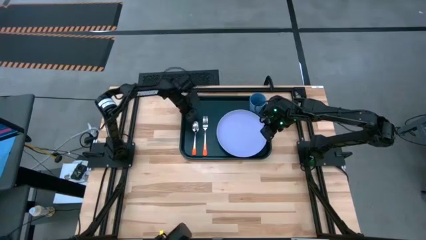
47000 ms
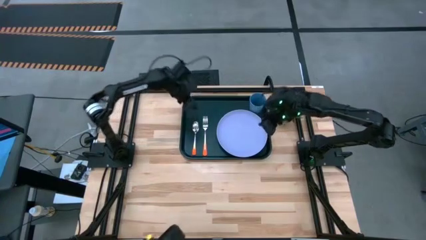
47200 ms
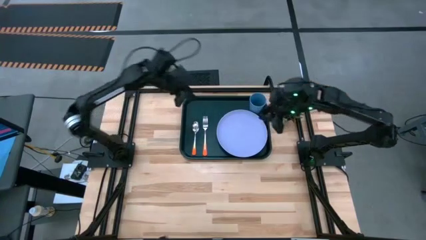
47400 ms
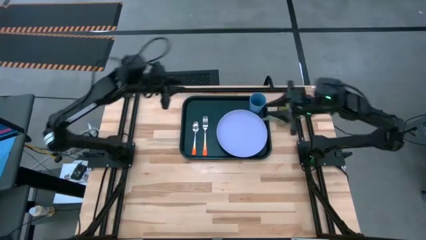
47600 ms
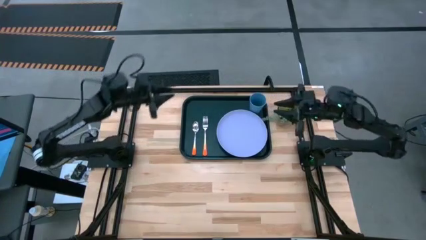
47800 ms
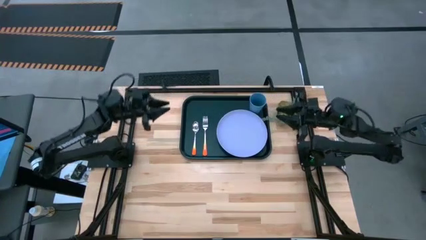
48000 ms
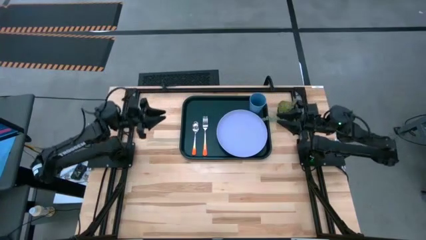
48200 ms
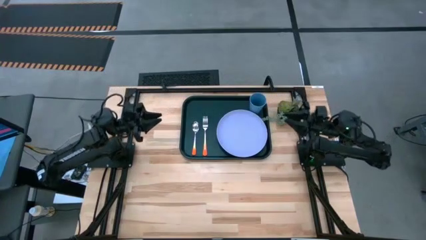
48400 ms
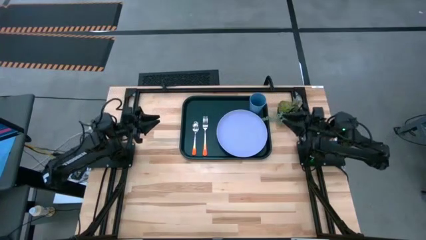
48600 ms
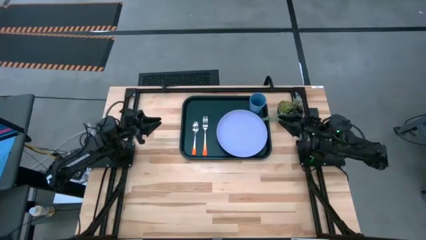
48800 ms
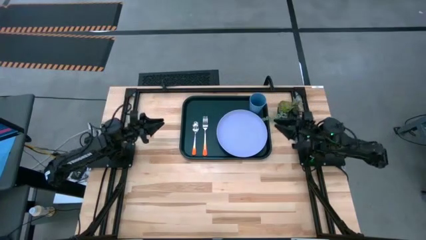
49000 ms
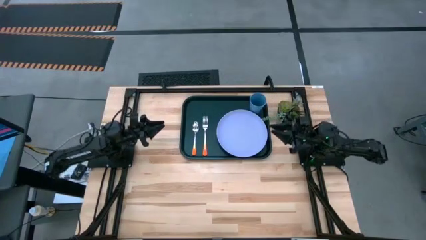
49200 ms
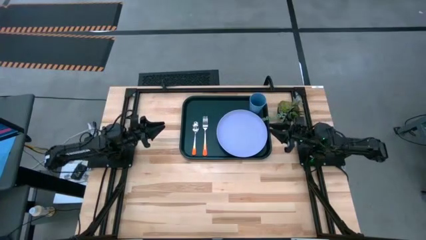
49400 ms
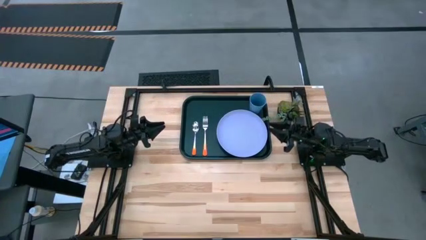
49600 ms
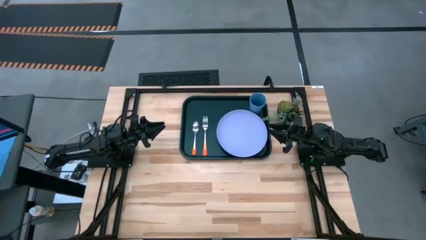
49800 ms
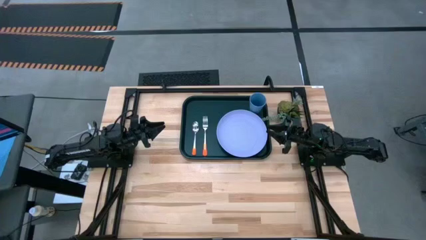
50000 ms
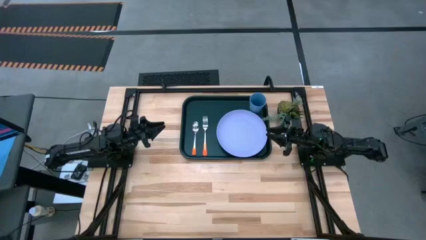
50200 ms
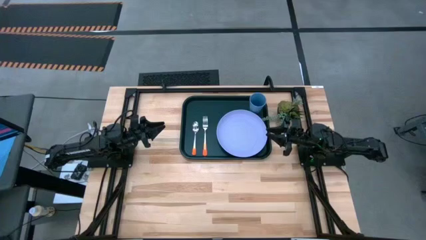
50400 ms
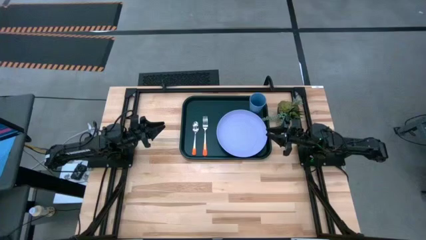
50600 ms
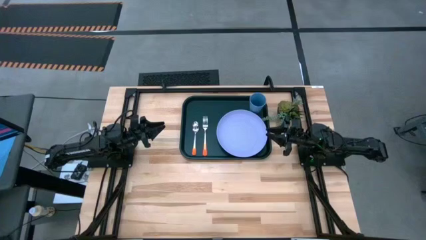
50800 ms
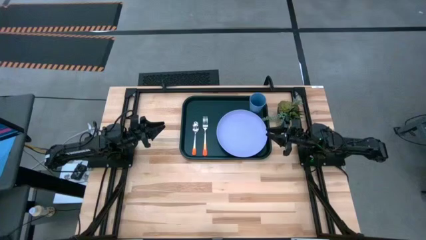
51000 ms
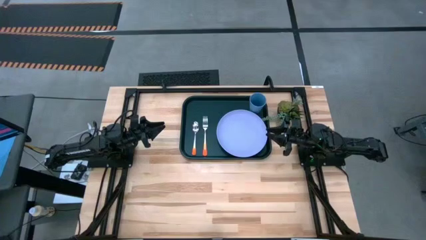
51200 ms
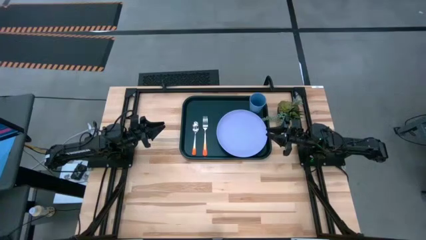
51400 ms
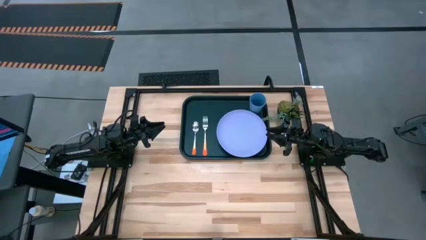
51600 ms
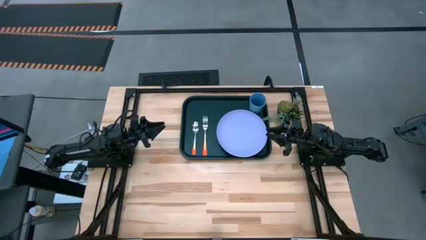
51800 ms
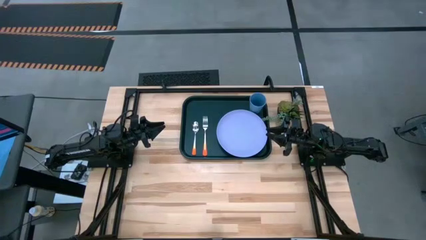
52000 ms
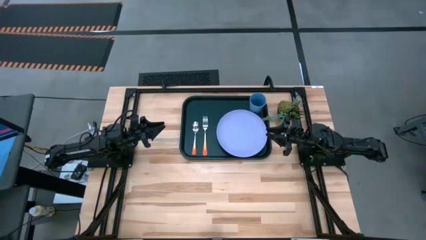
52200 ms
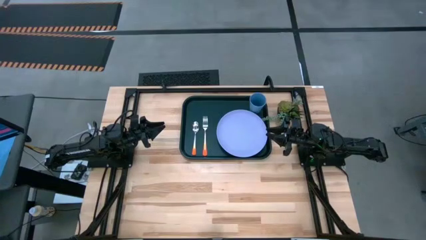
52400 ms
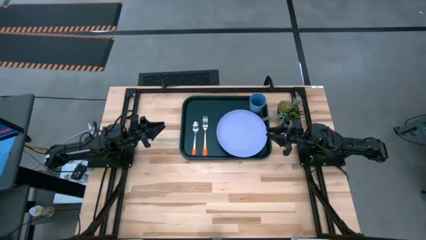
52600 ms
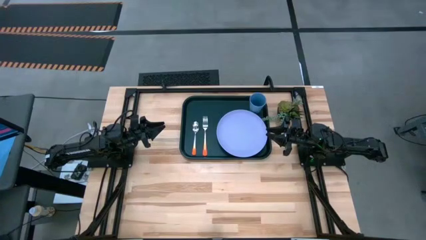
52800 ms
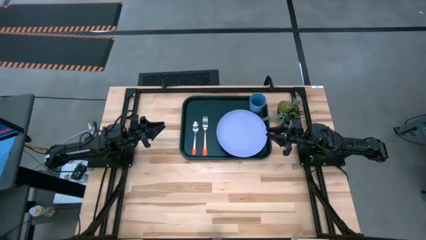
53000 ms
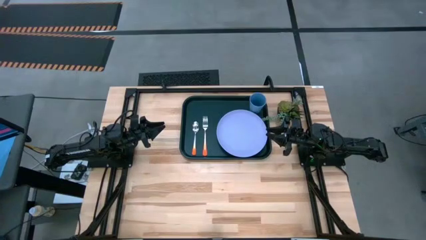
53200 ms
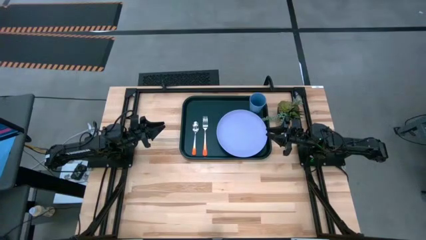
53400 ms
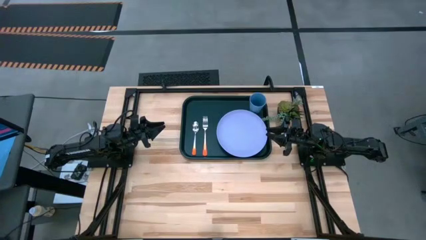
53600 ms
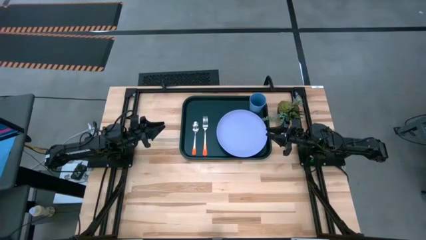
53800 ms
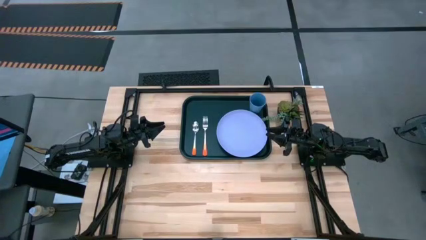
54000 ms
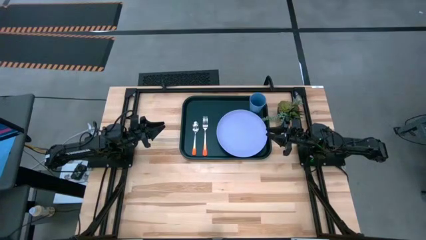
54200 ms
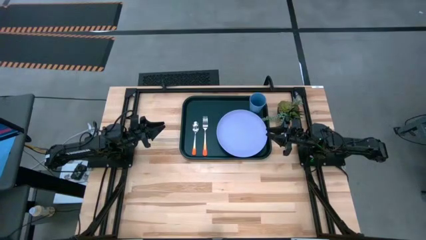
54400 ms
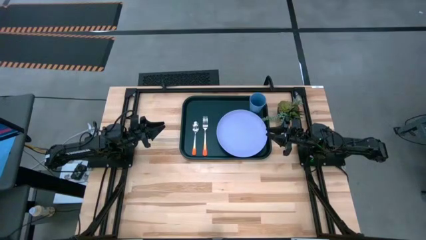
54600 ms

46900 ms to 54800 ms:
Task: Pick and place plate/cup/fork/spoon on tray
Return to Home Position

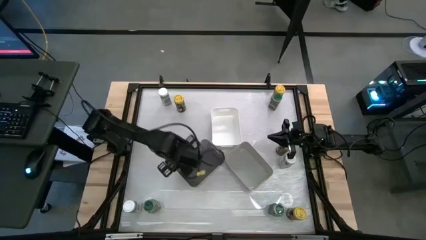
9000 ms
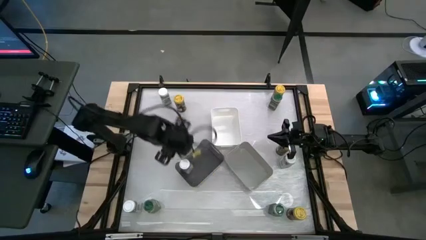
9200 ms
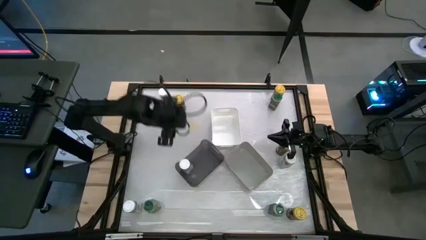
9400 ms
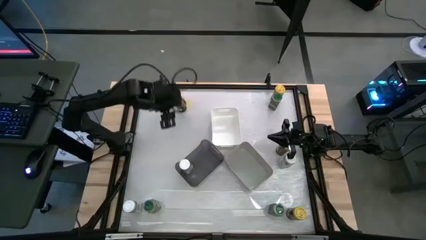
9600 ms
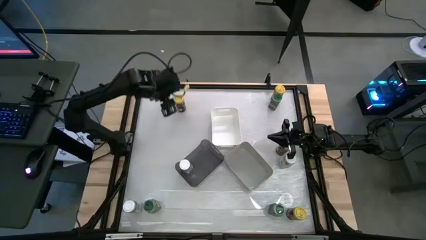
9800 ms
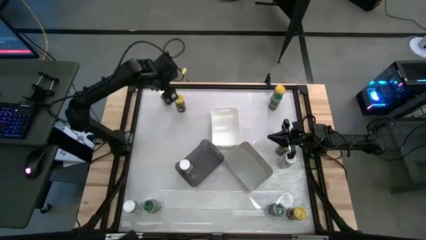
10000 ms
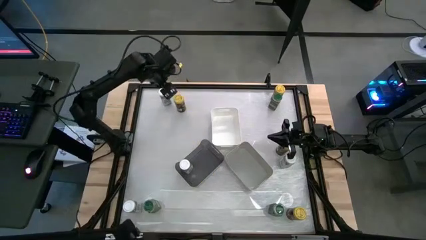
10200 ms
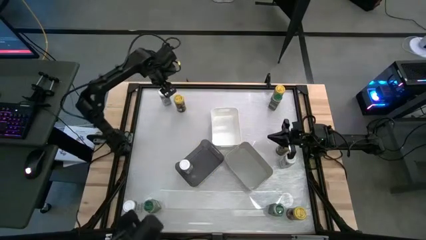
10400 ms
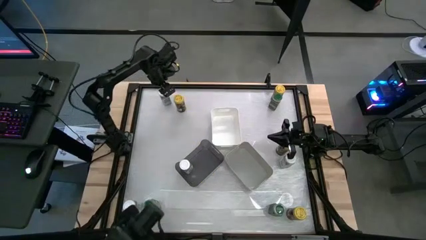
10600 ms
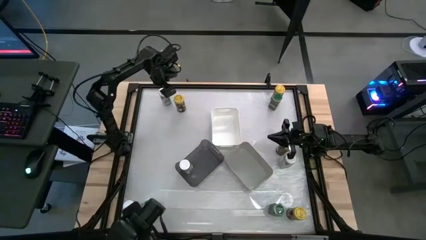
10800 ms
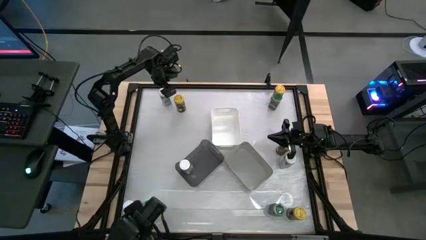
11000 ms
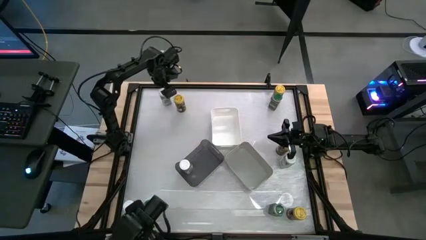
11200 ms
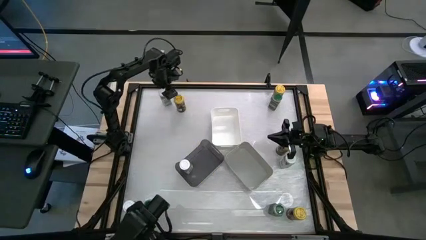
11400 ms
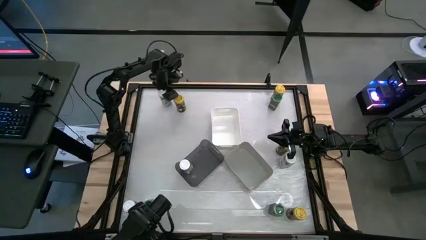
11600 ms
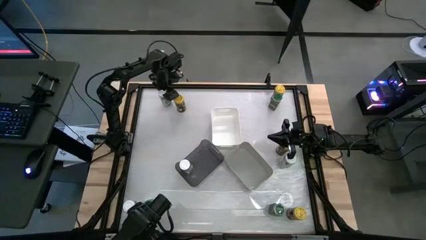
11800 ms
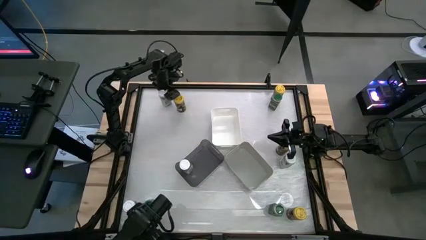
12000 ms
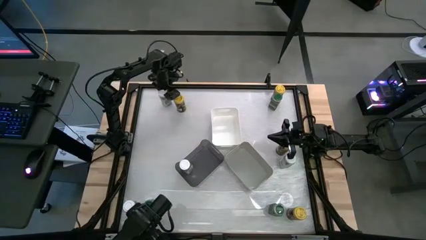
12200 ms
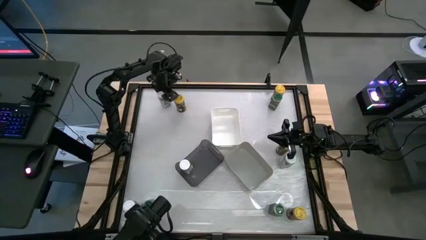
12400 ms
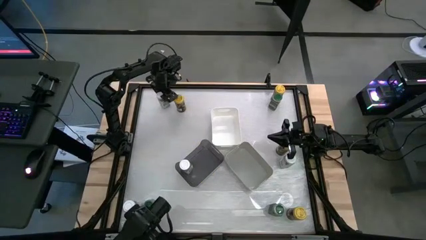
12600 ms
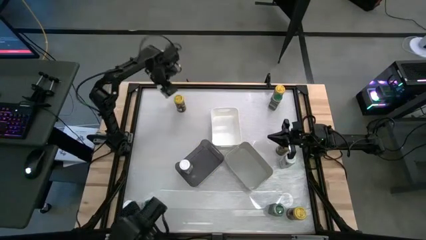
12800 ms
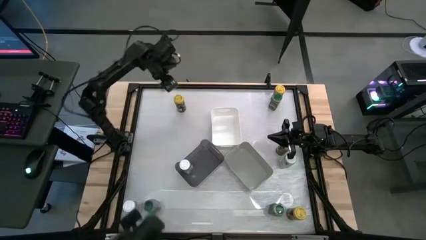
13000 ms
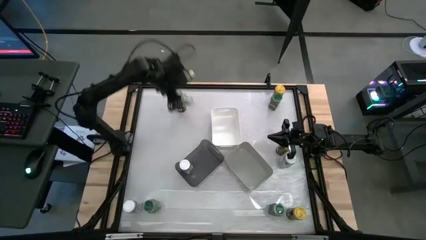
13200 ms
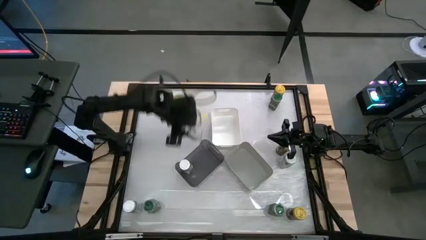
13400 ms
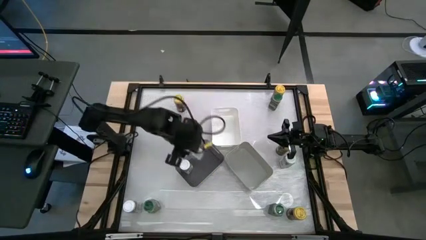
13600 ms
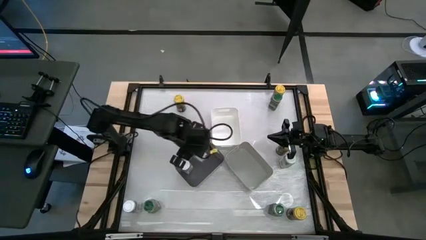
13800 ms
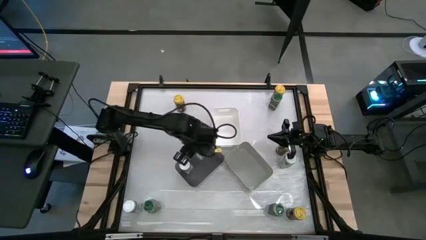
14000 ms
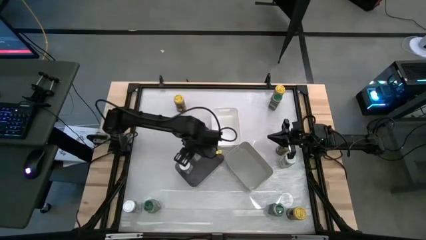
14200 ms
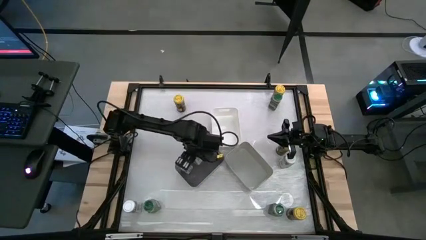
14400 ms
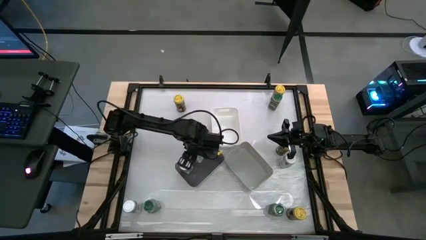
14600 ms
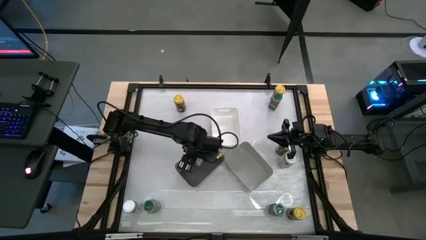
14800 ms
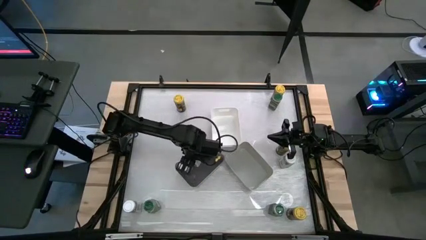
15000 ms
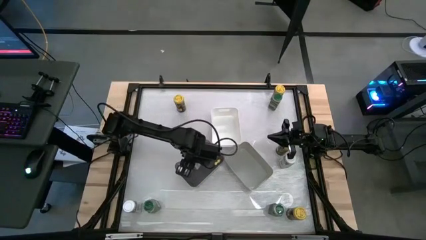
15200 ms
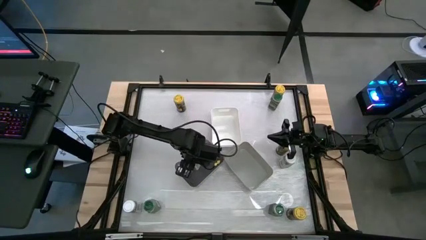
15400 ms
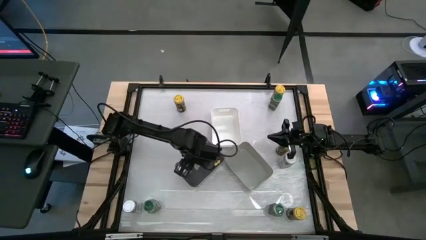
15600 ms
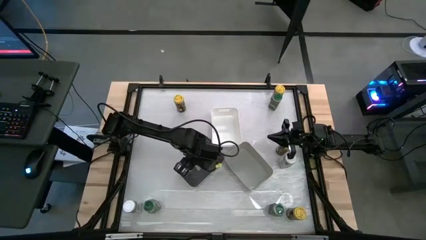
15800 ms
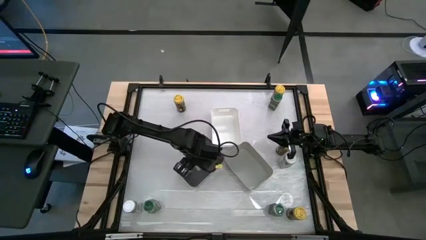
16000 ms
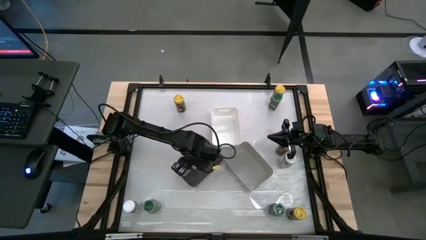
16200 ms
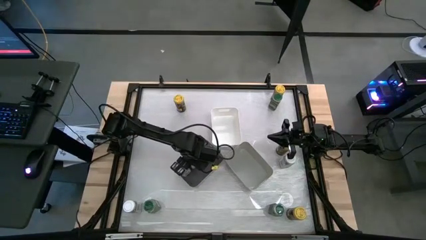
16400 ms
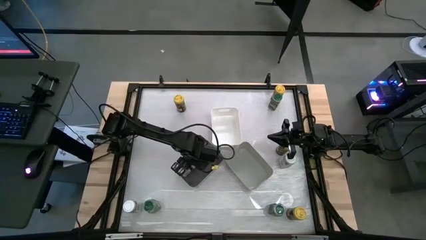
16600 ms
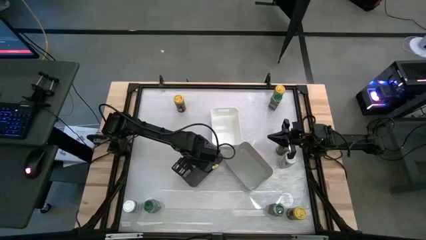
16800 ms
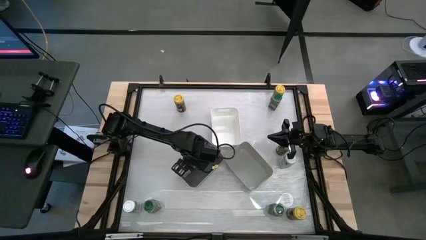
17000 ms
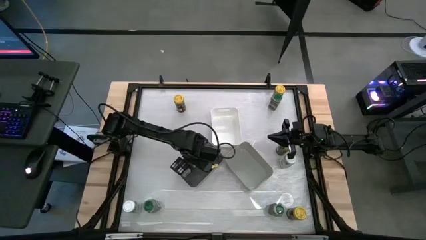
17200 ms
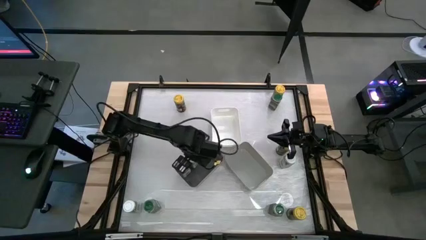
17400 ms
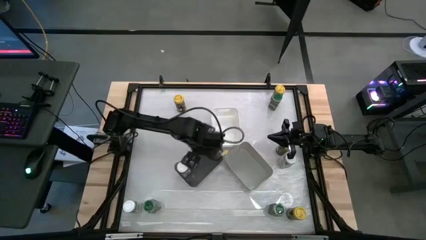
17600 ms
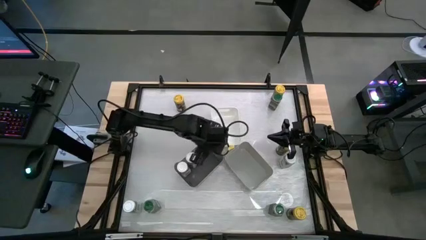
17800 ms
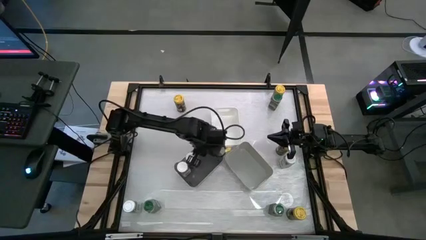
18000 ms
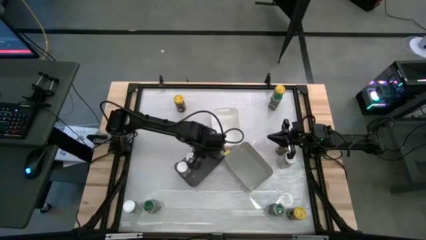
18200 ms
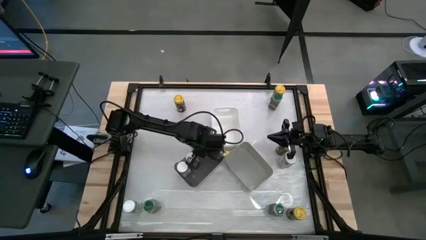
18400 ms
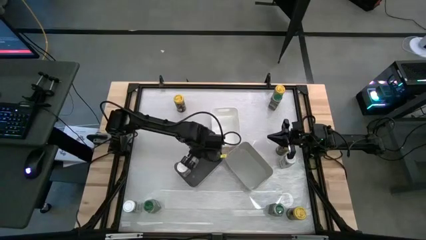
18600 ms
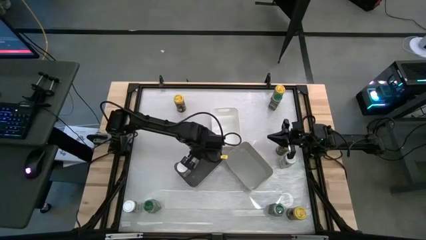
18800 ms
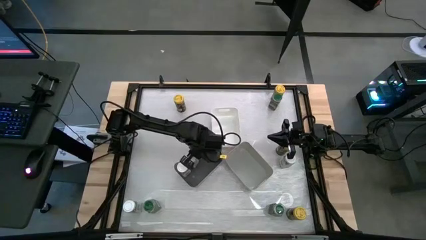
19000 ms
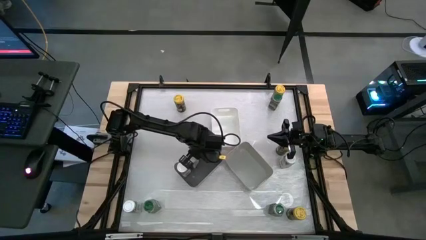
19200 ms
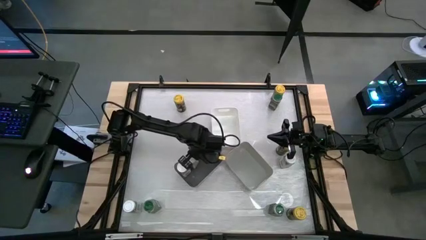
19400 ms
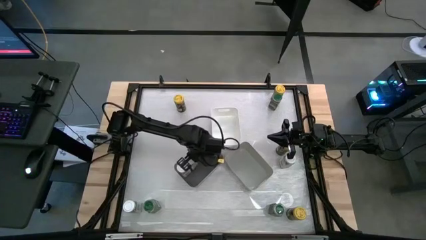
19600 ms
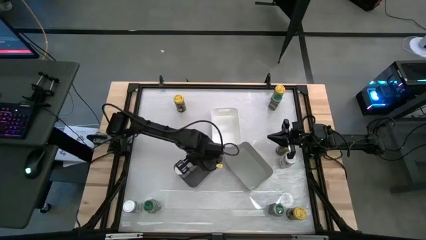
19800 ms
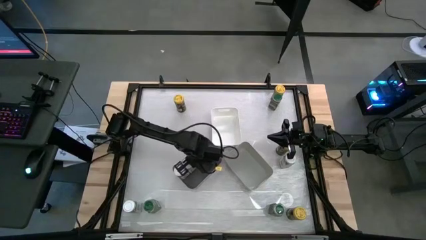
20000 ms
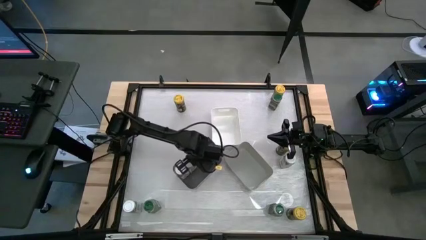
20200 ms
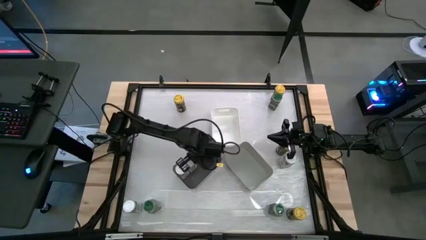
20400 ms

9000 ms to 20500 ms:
Task: Sort spices by type
Put the white seasoning bottle into the black bin
